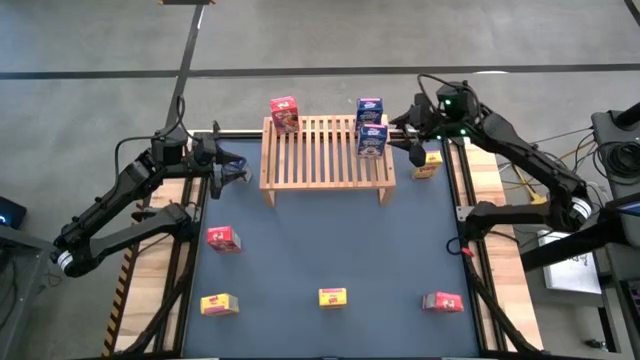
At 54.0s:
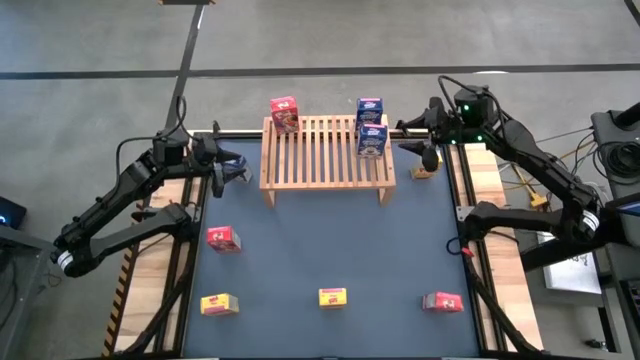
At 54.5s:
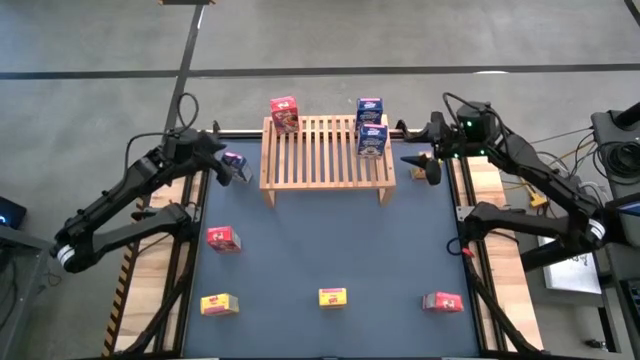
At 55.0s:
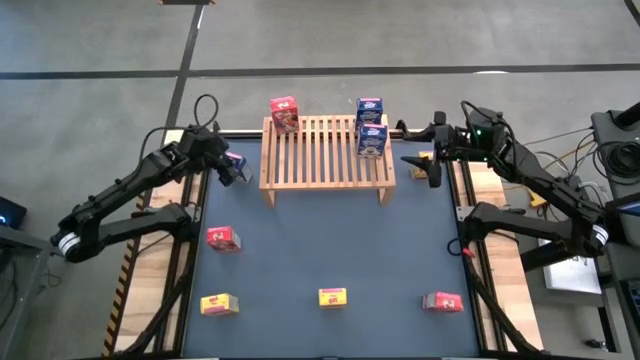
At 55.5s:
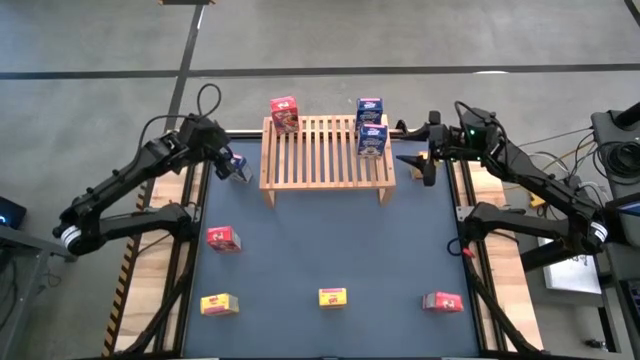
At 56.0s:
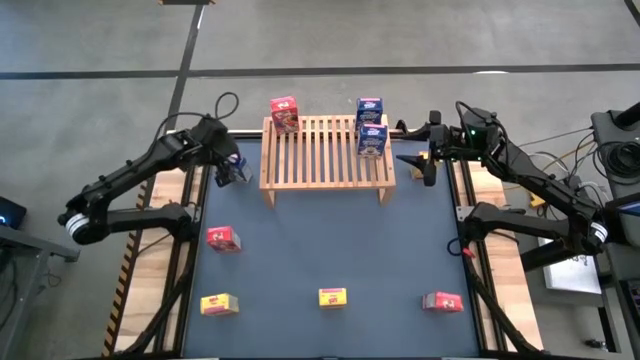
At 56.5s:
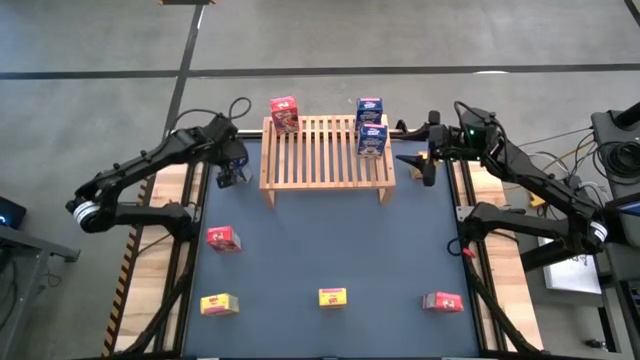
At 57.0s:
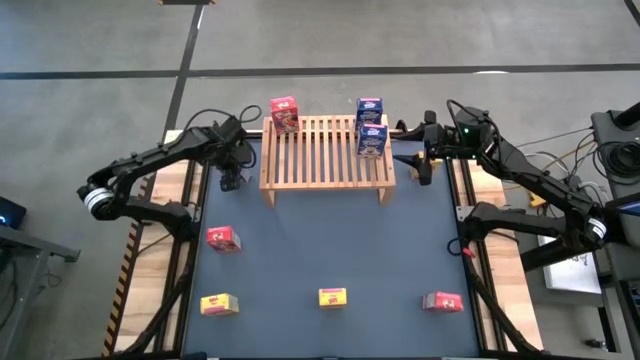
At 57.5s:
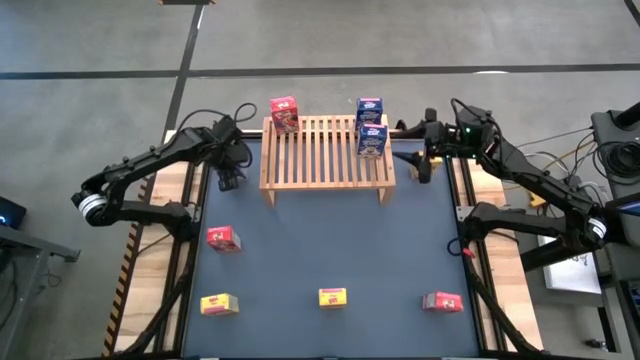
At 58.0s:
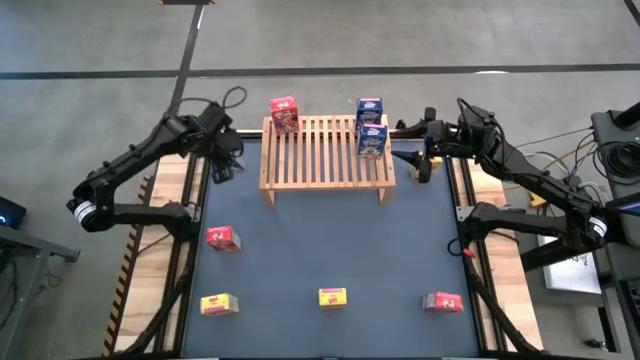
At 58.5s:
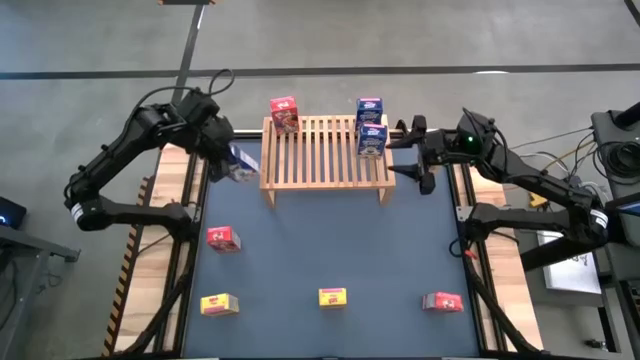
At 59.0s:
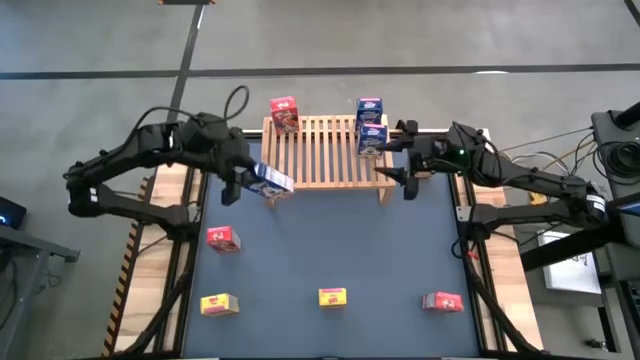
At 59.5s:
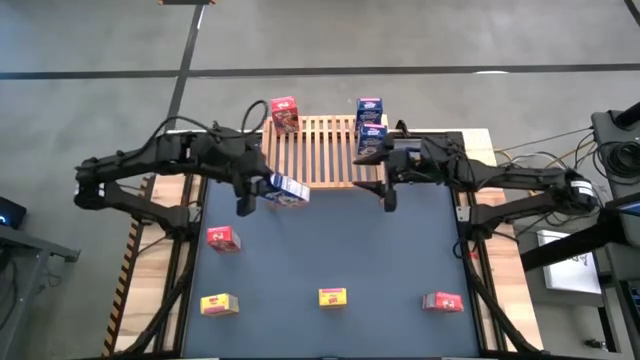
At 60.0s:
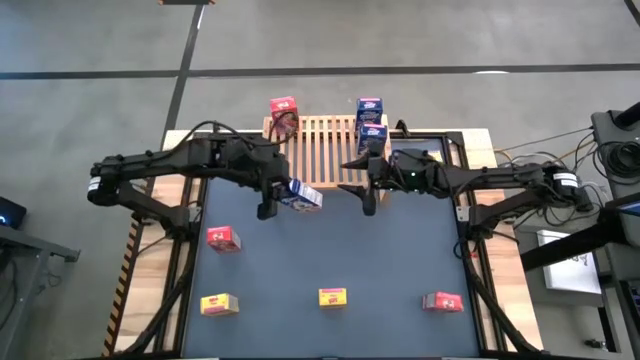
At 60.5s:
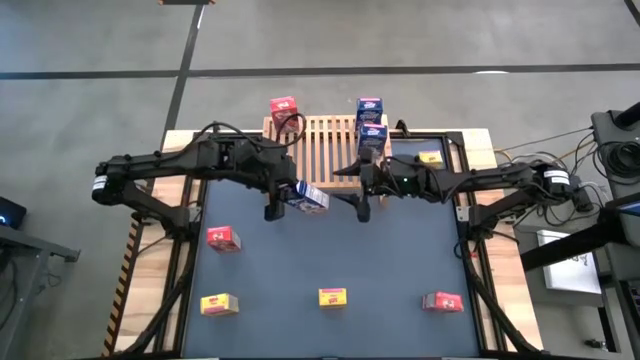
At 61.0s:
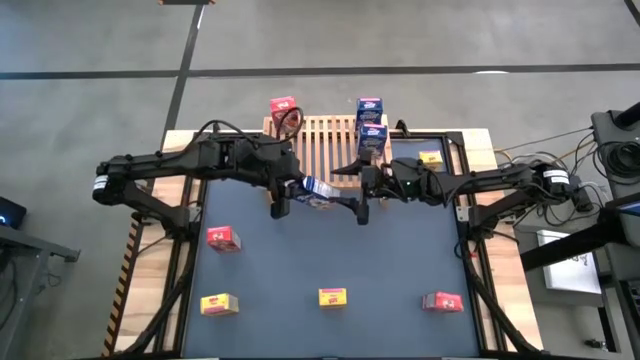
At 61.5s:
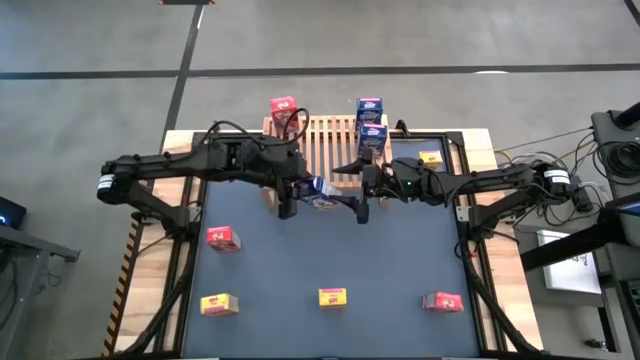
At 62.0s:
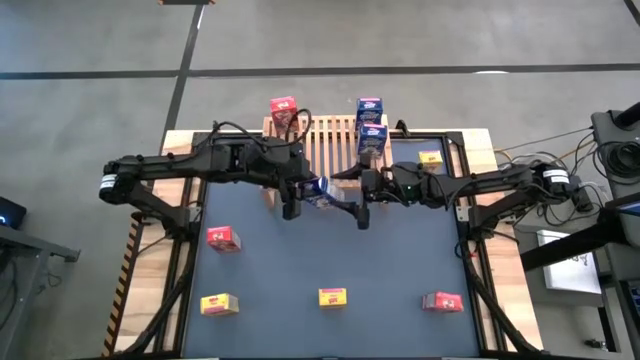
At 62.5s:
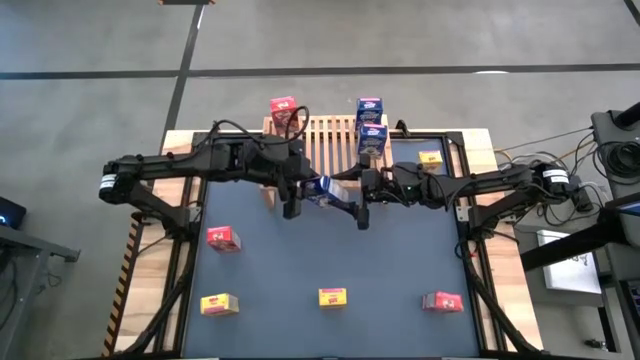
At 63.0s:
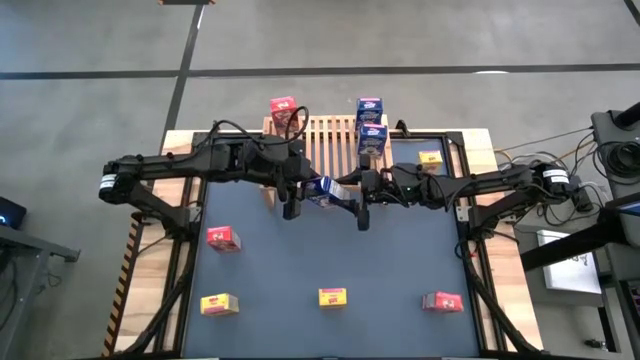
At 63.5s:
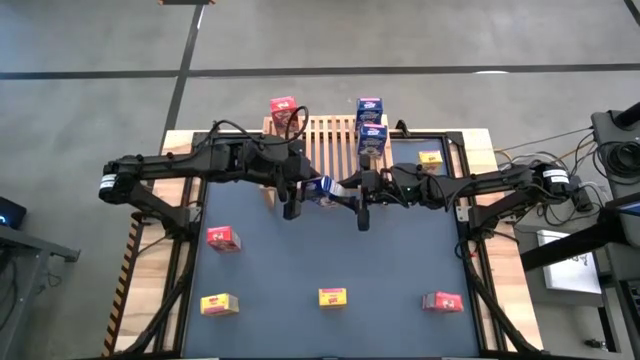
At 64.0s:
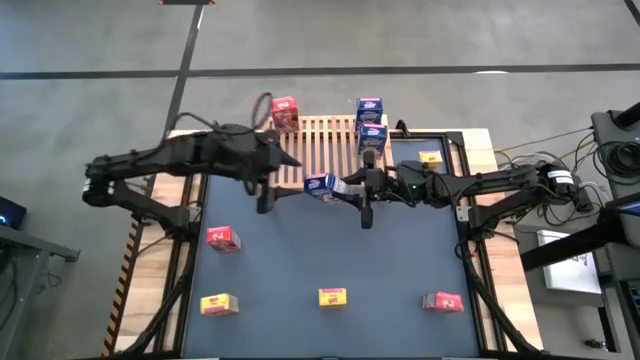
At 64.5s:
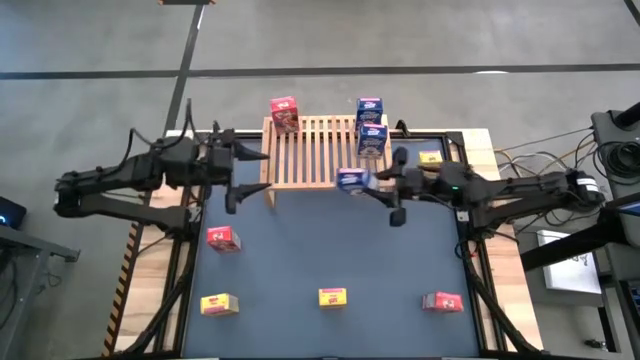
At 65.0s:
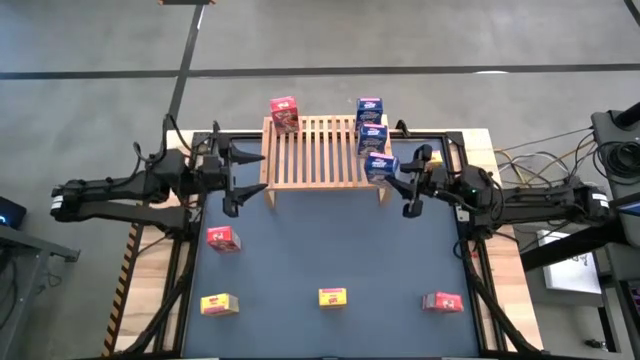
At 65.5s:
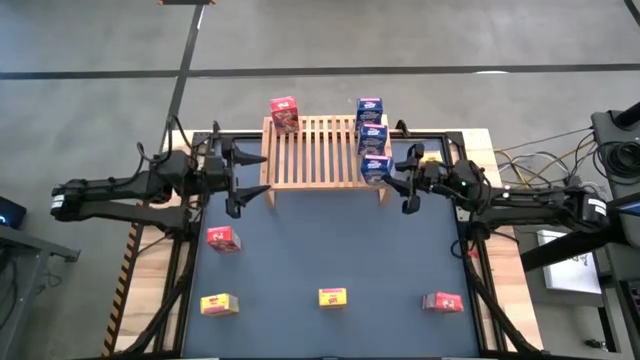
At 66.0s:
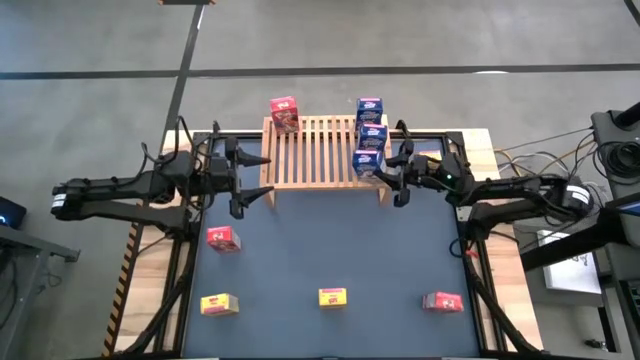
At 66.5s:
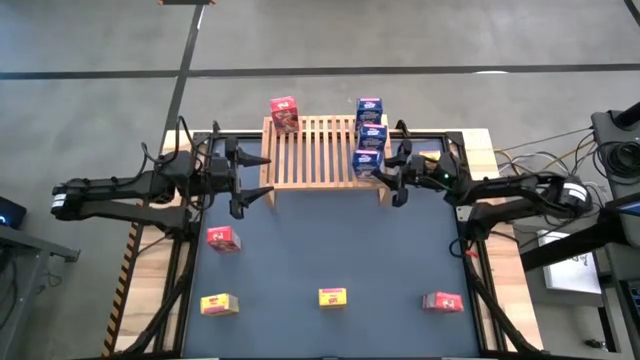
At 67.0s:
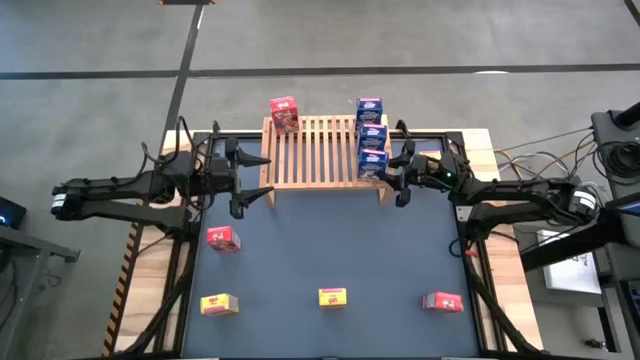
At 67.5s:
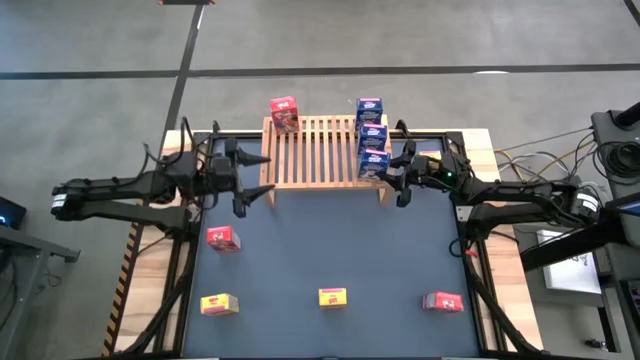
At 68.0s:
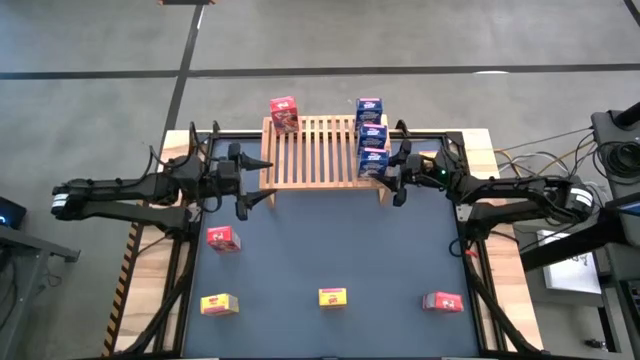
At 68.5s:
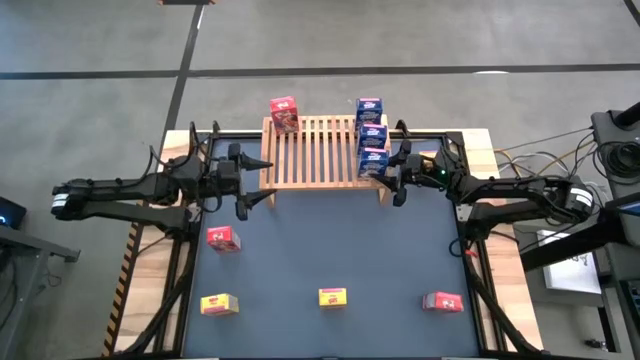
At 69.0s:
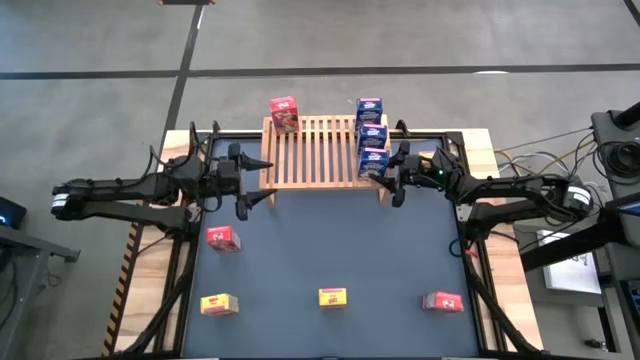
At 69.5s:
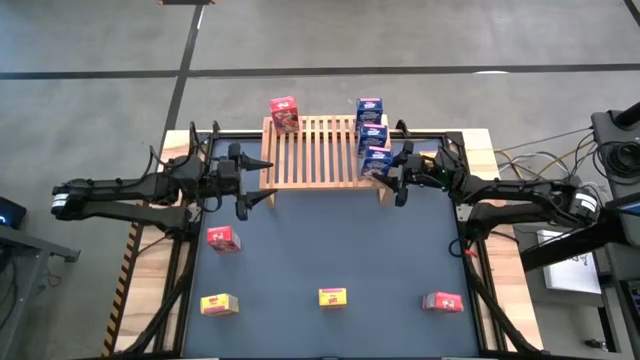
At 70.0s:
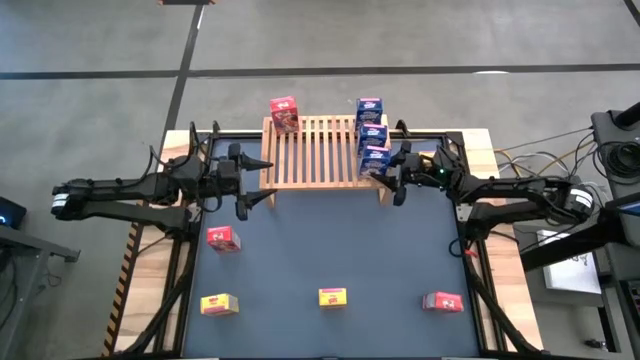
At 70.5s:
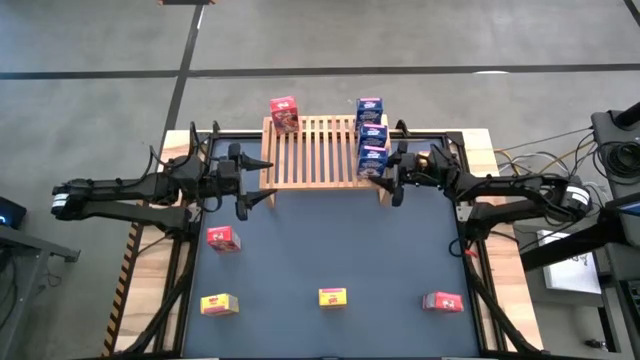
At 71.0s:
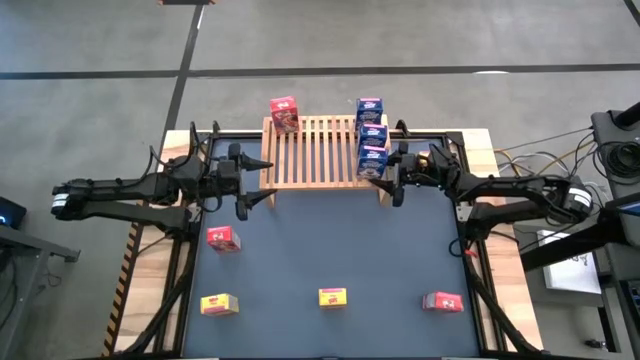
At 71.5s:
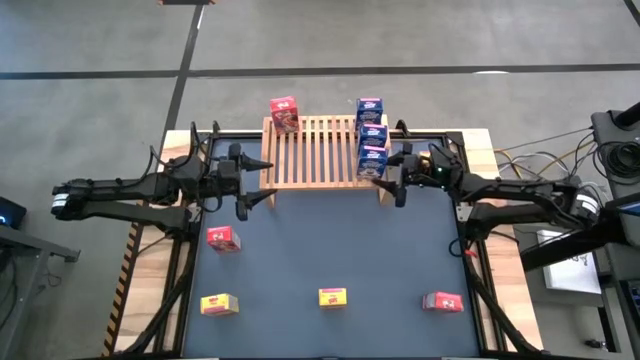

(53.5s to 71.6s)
Task: Stack cereal on shelf
Put the blue cereal box on the shelf aligned with the blue cereal boxes

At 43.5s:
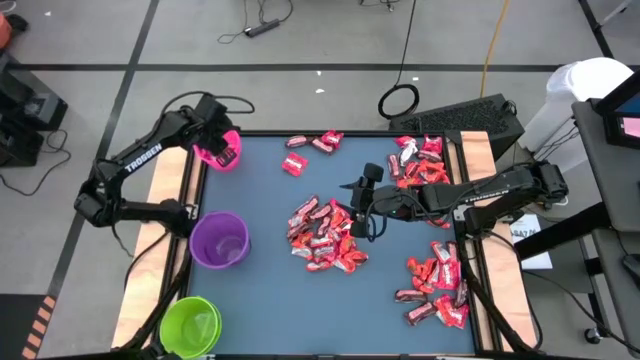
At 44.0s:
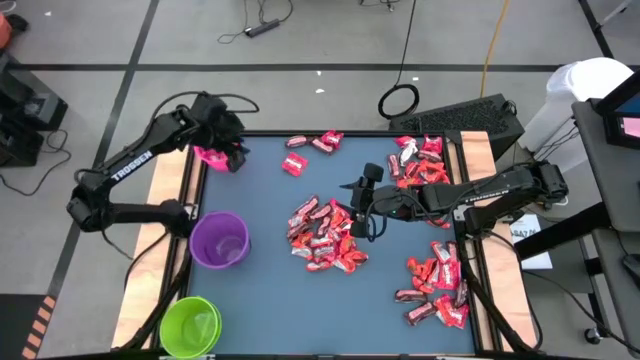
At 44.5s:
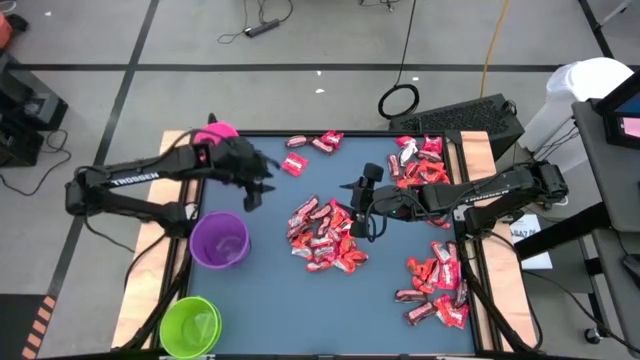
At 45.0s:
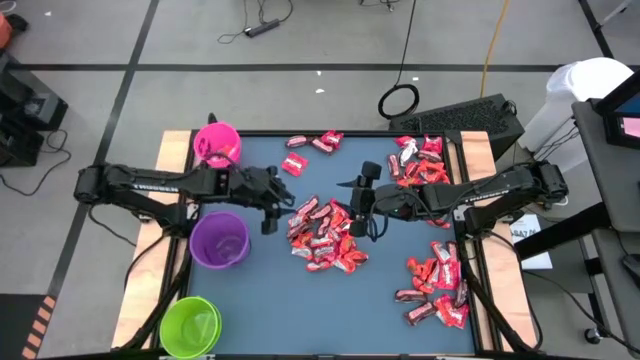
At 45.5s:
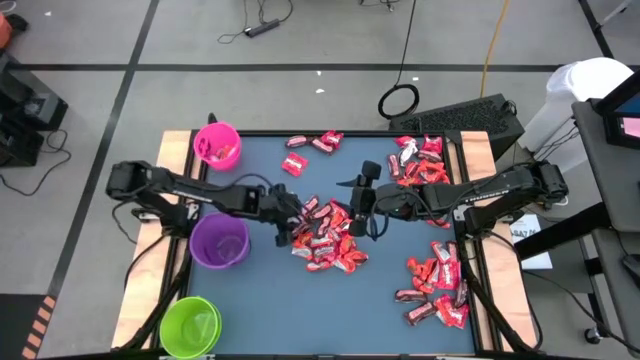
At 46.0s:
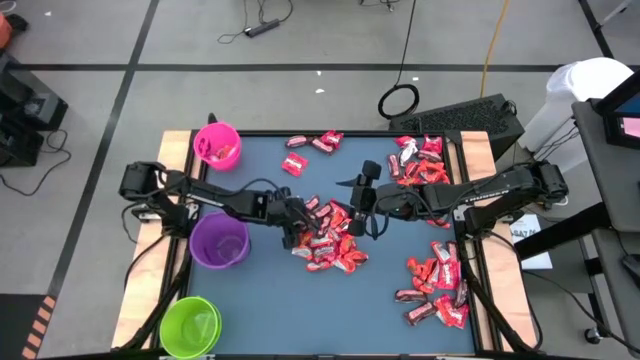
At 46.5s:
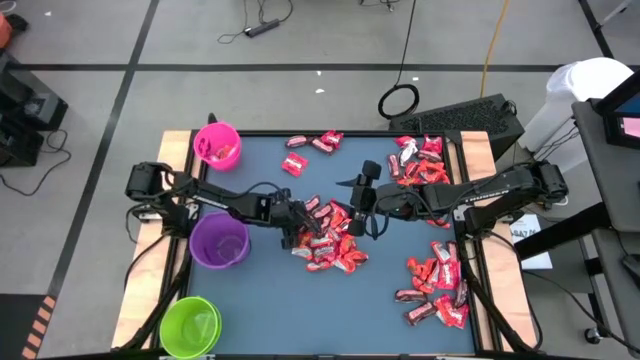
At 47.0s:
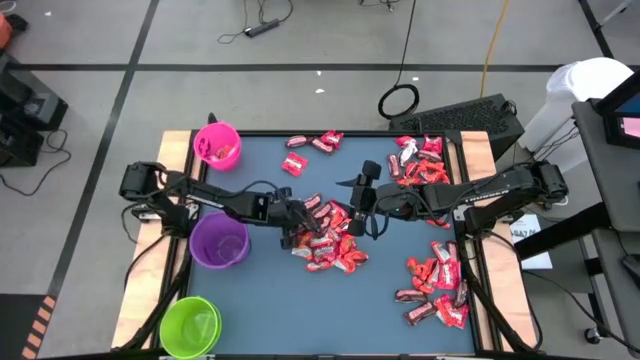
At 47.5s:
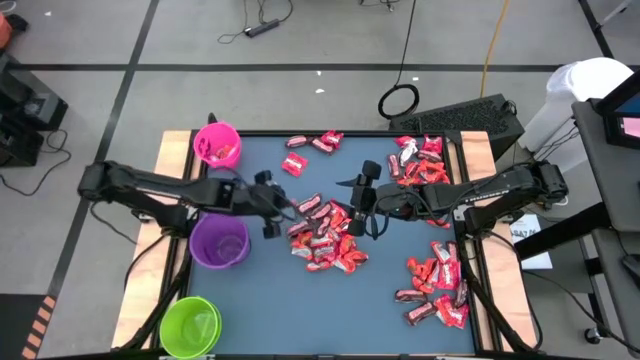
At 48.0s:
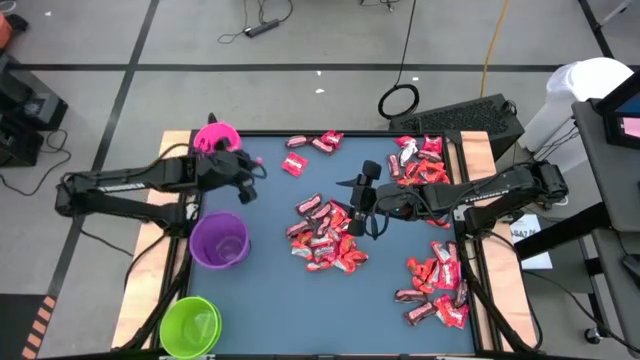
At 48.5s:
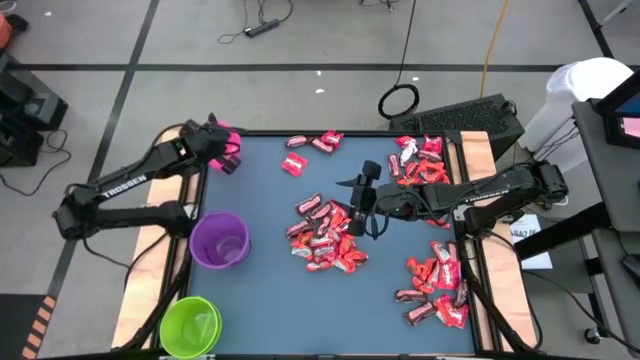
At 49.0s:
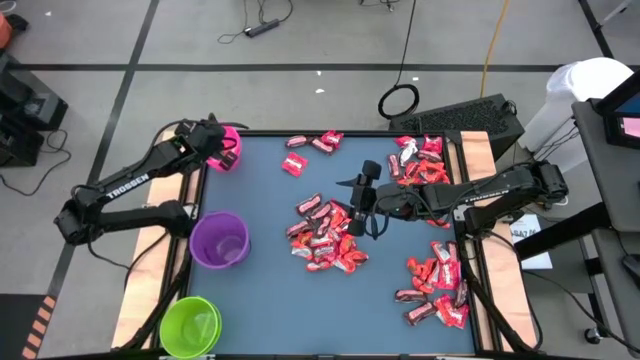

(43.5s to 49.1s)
Task: Organize candy in baskets
Put the orange chocolate into the pink bucket
